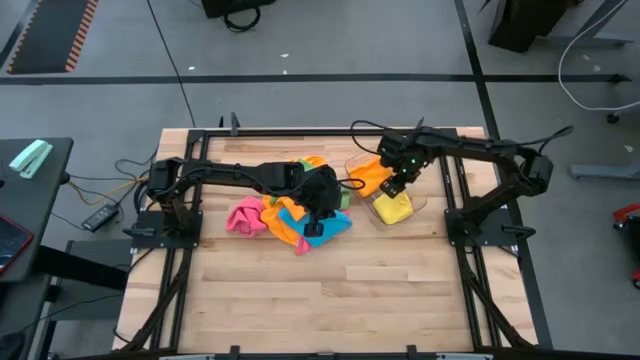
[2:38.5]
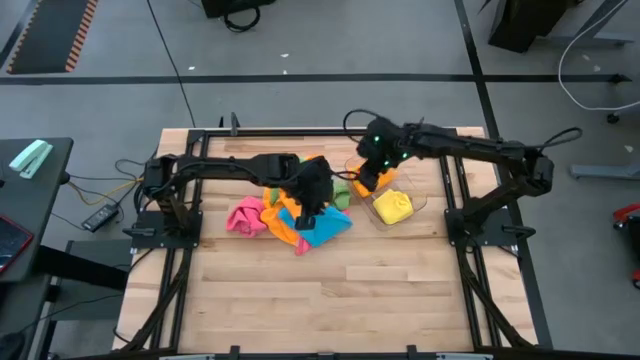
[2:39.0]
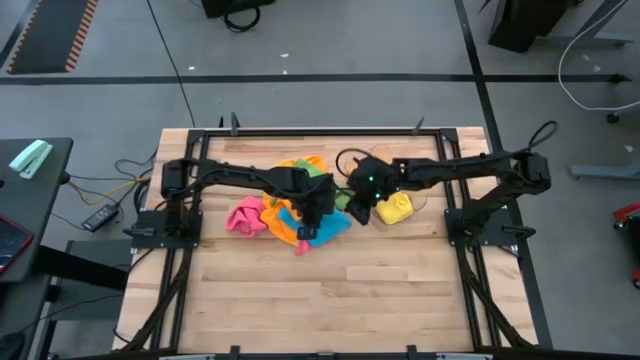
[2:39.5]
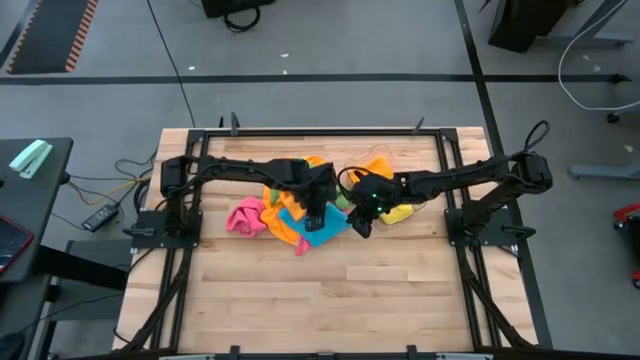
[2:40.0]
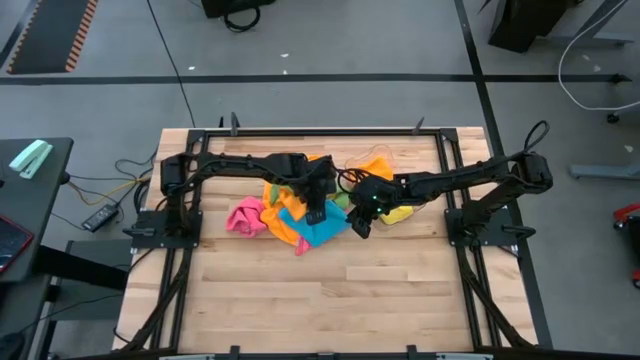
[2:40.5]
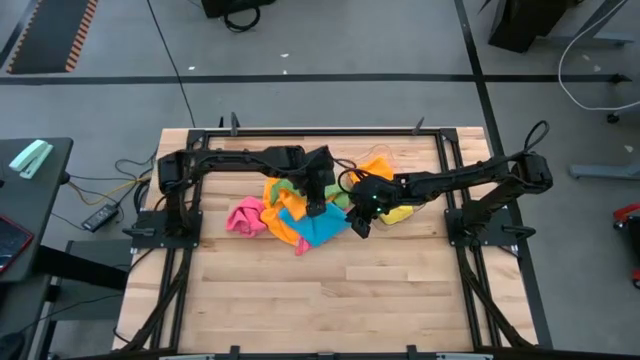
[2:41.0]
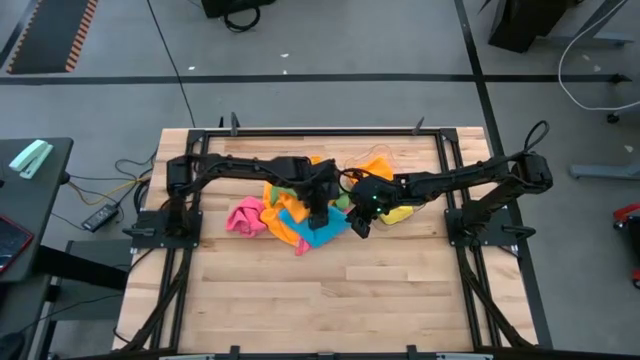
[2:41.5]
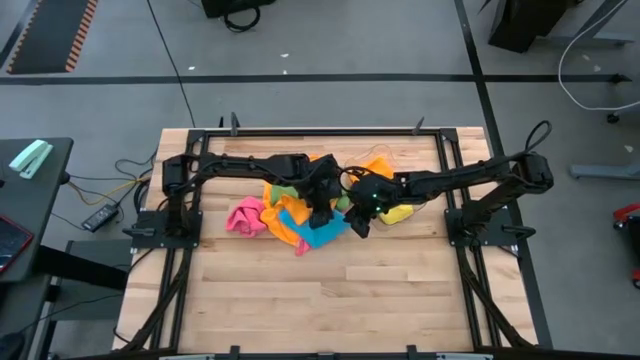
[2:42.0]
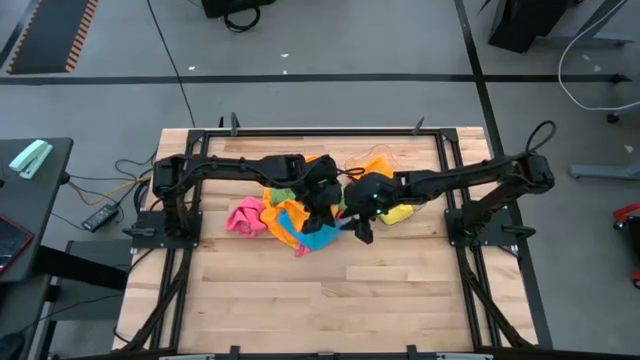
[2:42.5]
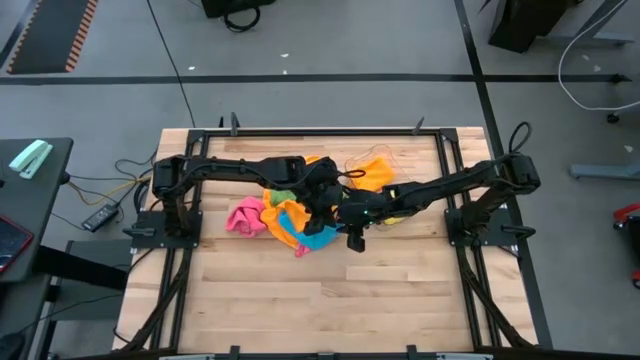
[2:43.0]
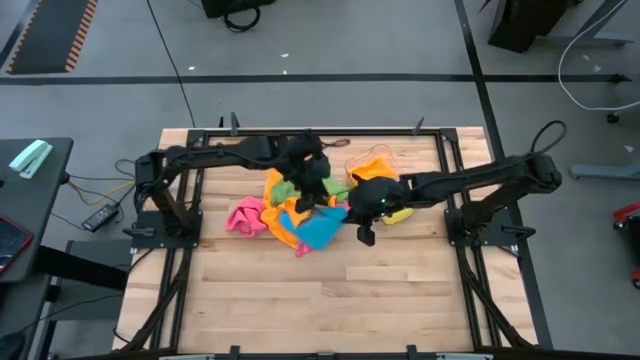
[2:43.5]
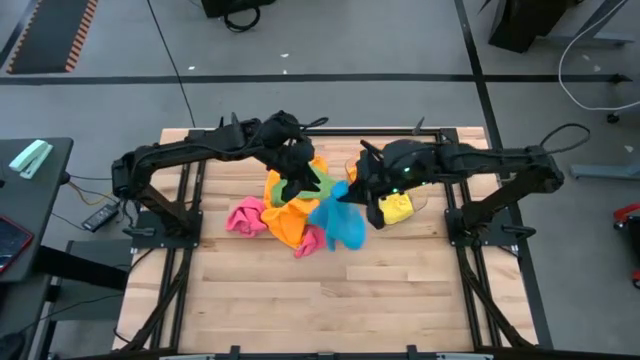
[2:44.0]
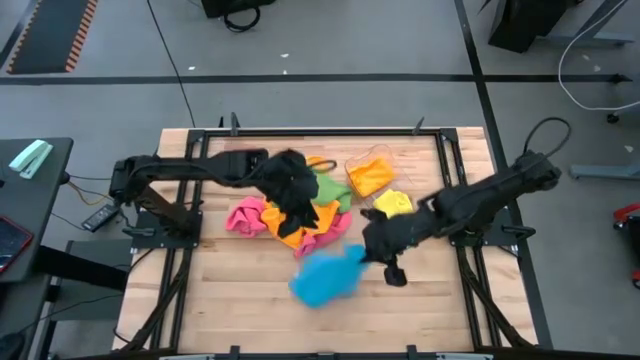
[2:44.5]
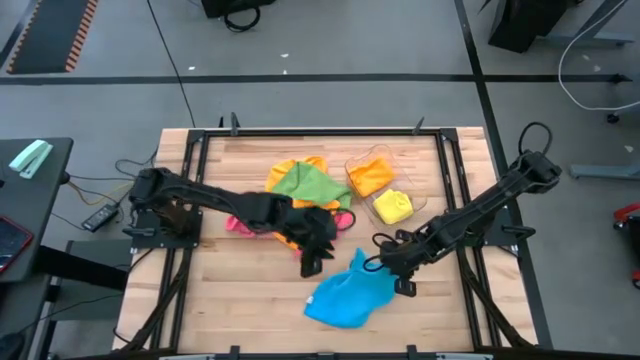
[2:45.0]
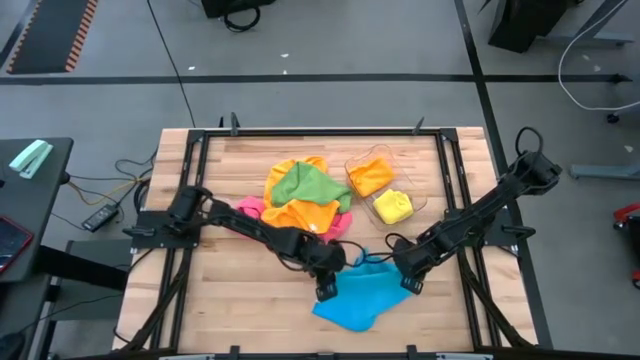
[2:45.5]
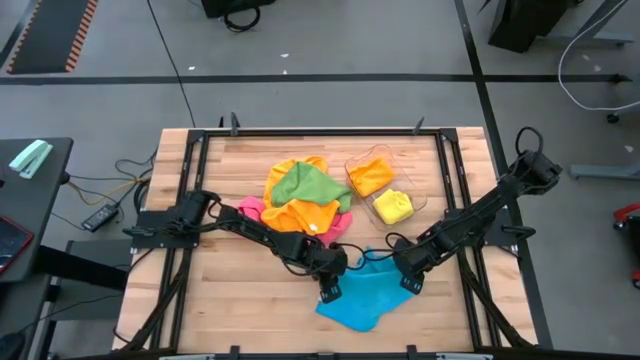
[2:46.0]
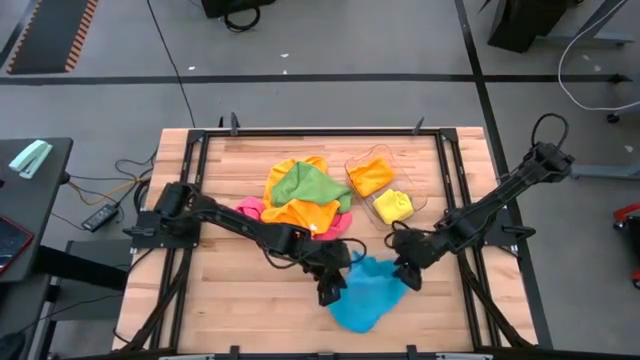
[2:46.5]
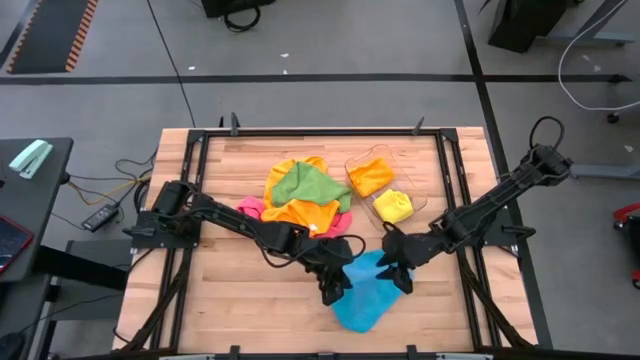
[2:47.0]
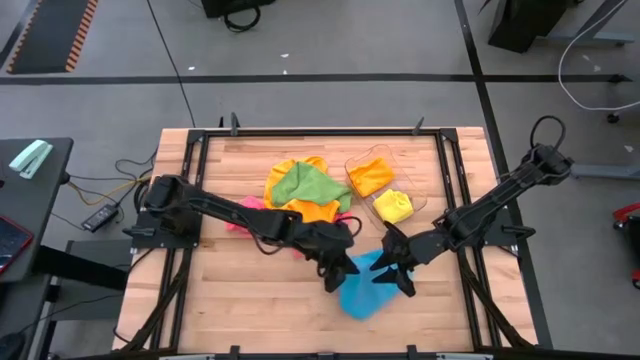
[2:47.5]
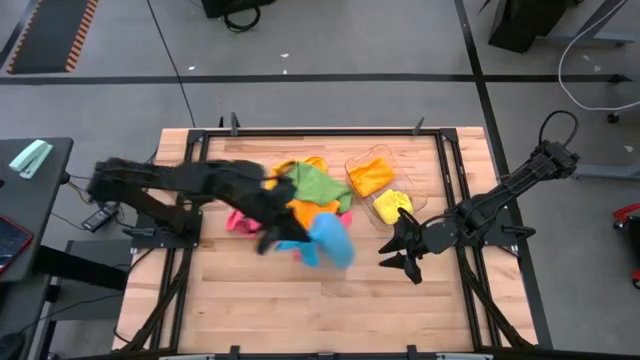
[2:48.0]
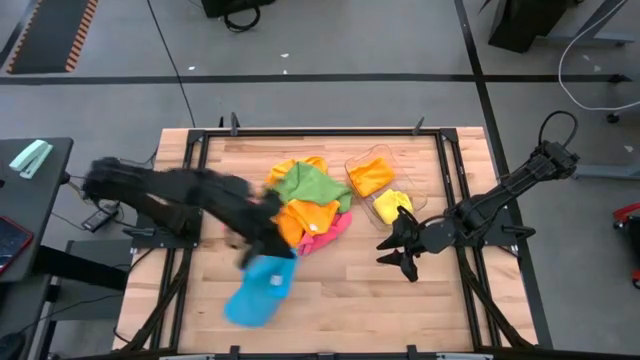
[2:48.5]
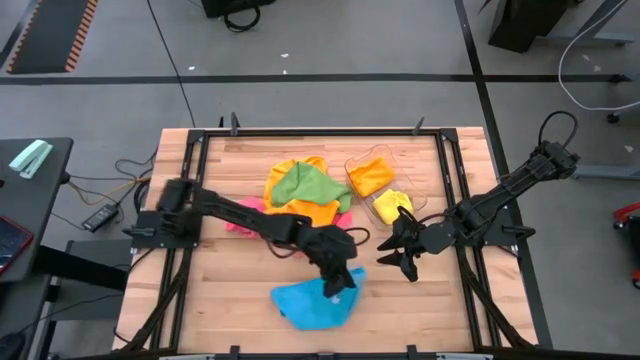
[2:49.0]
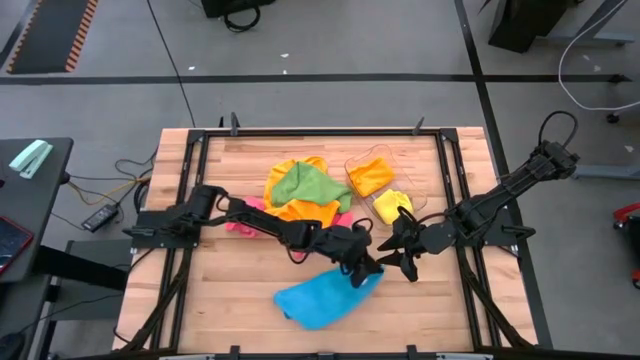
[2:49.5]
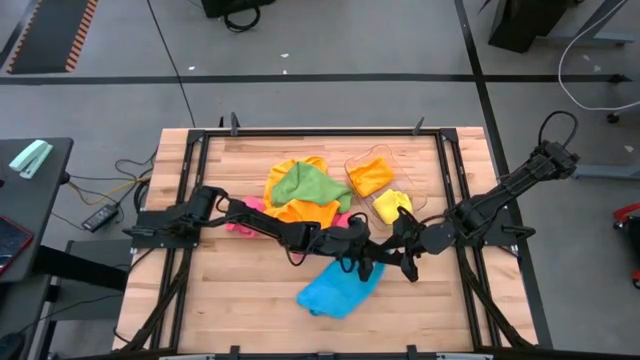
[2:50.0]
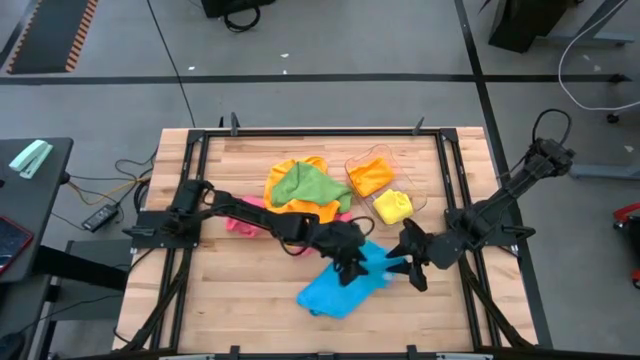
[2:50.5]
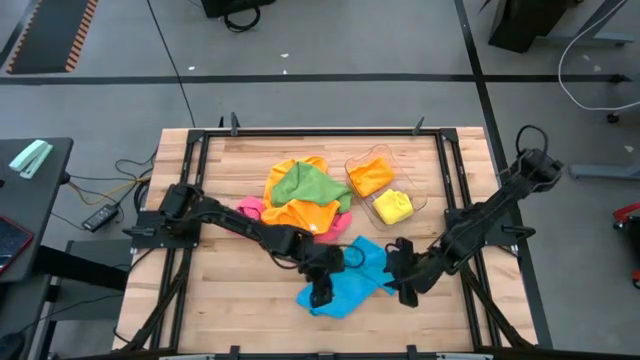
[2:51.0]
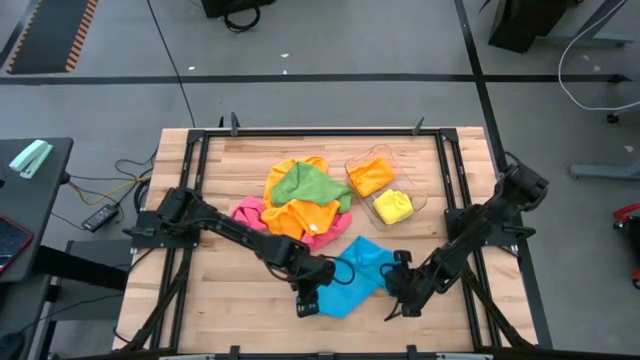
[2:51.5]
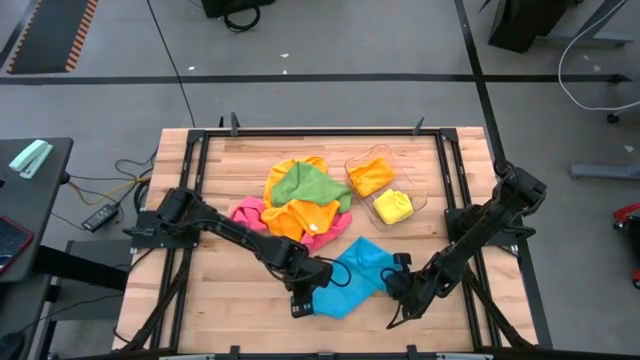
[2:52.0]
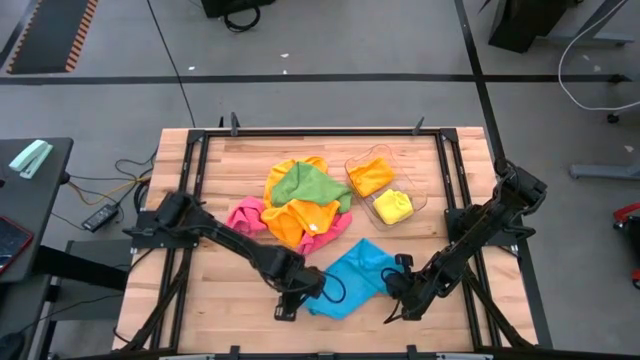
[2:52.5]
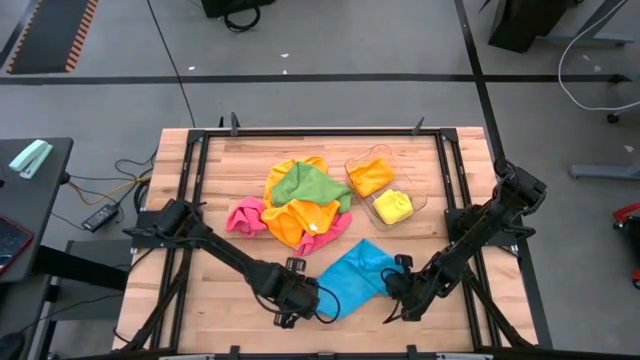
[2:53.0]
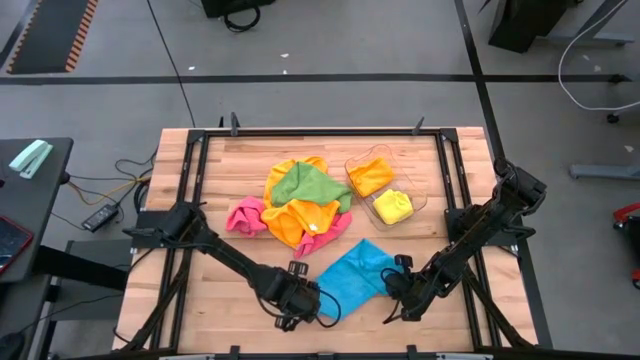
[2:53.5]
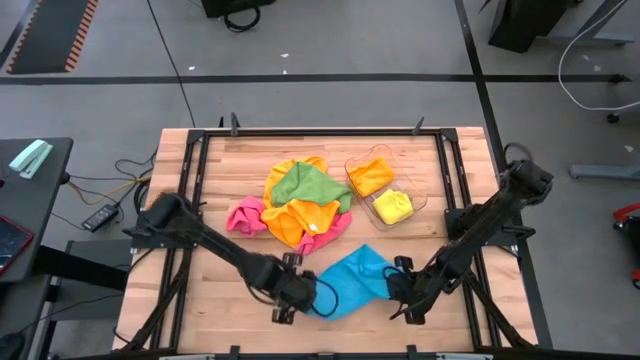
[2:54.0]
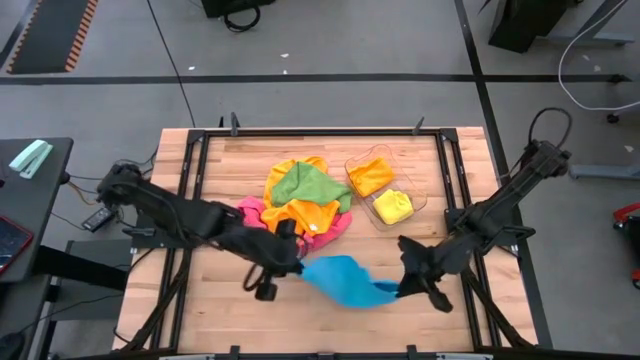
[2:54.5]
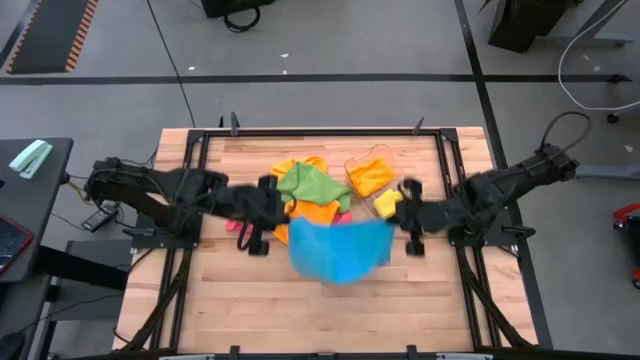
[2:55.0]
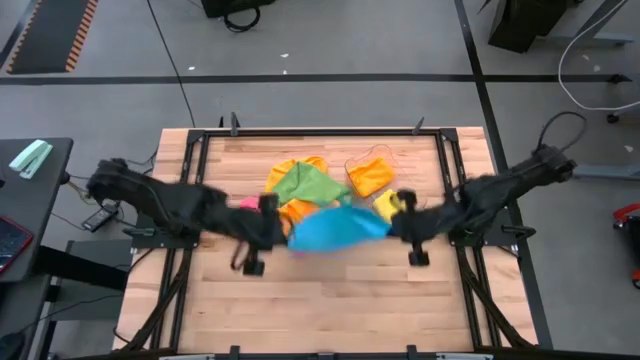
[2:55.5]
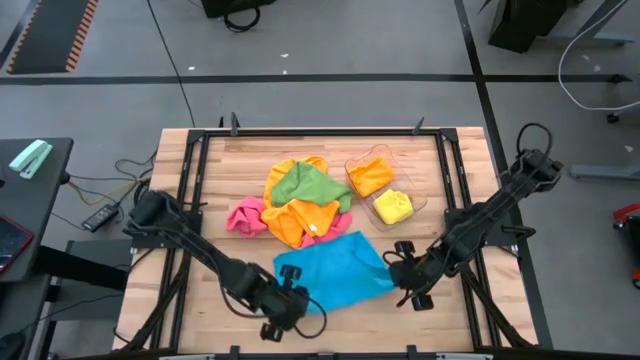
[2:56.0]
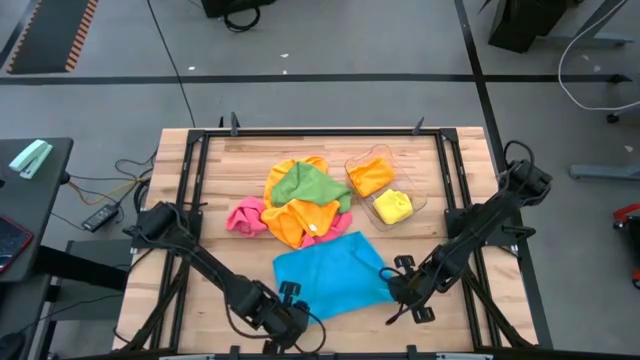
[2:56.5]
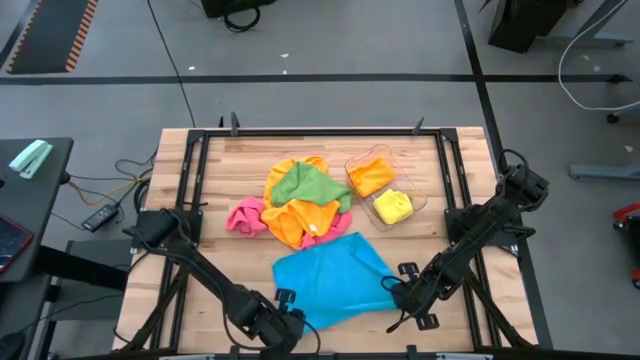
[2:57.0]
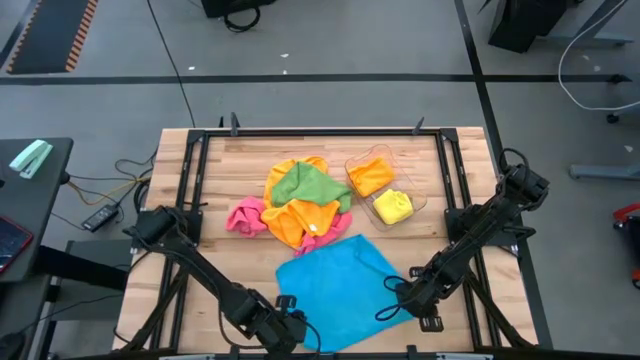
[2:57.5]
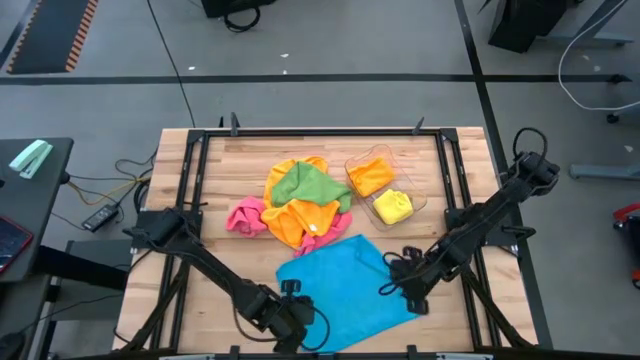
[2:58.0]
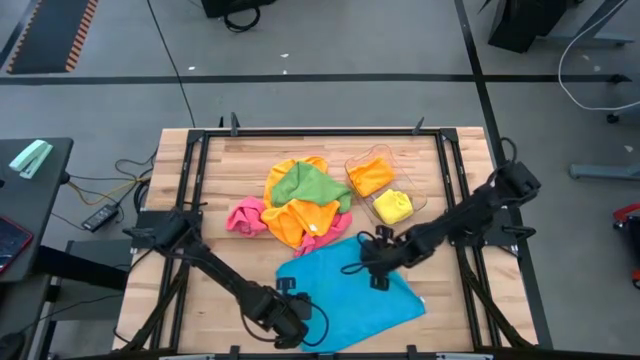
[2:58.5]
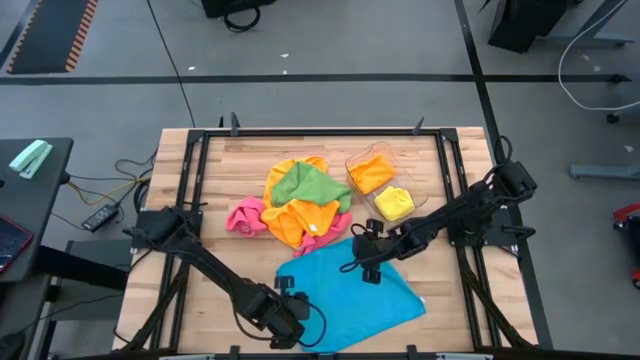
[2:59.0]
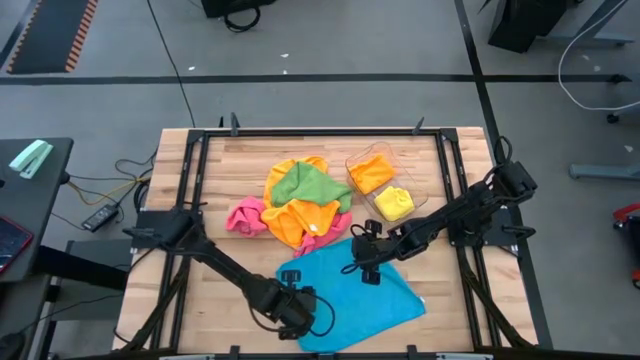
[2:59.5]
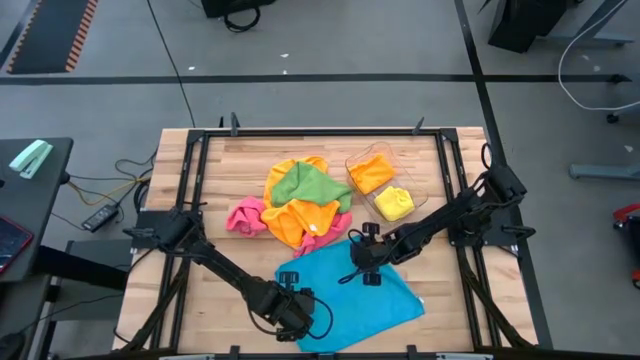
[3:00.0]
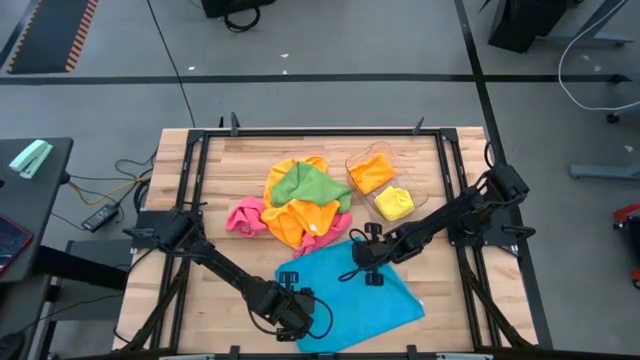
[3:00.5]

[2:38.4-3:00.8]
Task: Fold microfiber towels
Fold the blue towel
